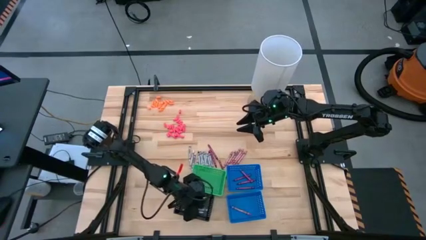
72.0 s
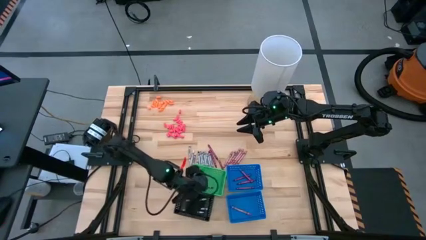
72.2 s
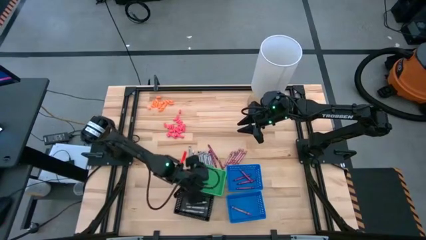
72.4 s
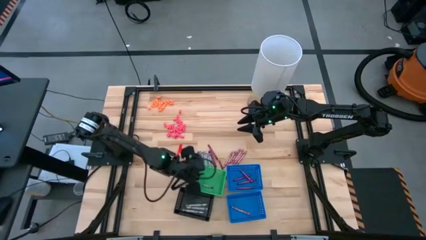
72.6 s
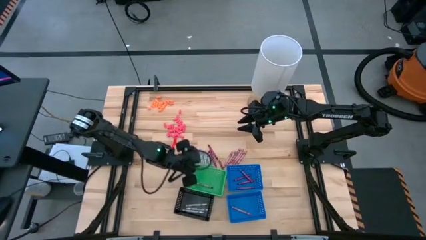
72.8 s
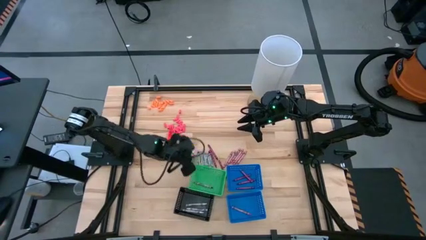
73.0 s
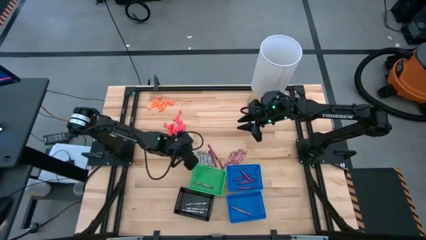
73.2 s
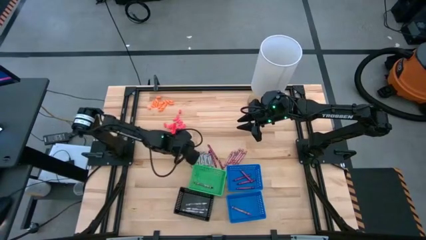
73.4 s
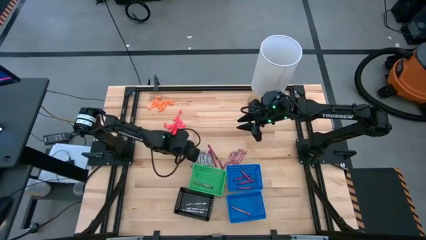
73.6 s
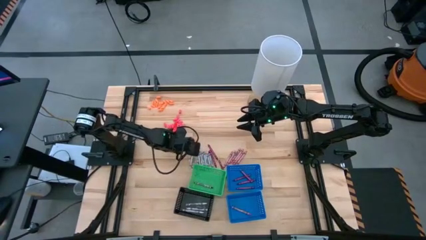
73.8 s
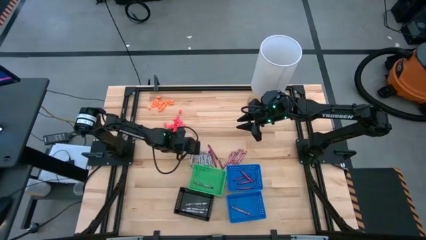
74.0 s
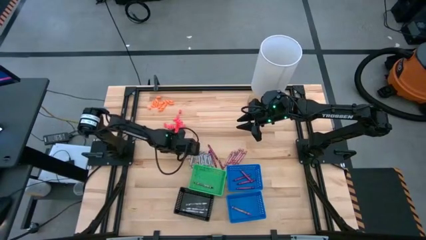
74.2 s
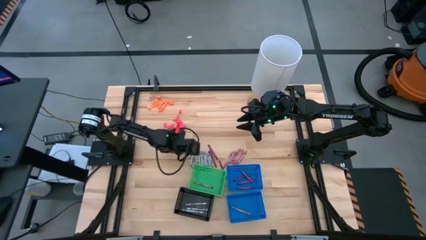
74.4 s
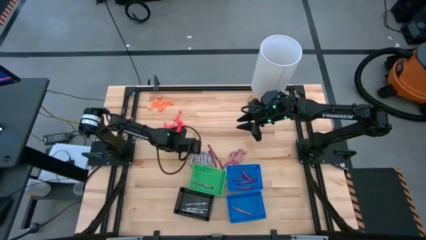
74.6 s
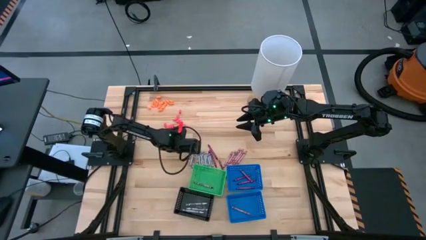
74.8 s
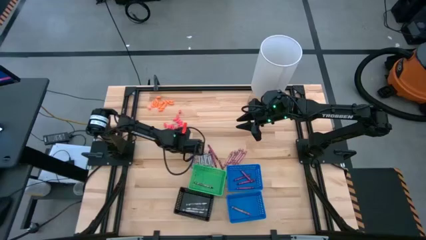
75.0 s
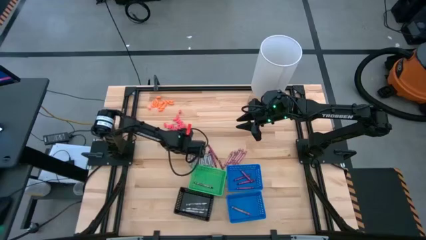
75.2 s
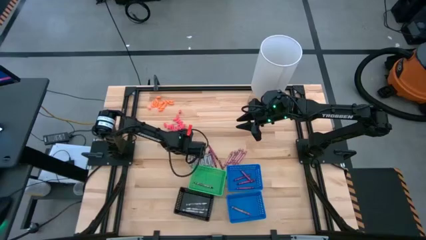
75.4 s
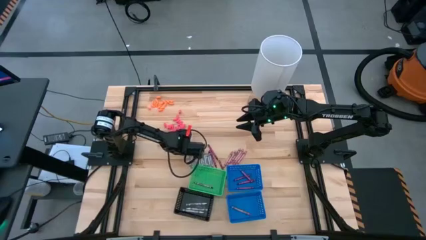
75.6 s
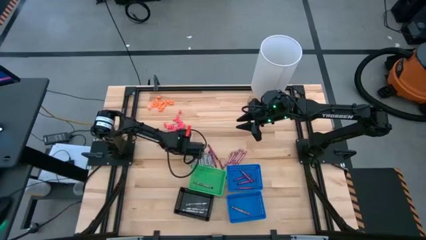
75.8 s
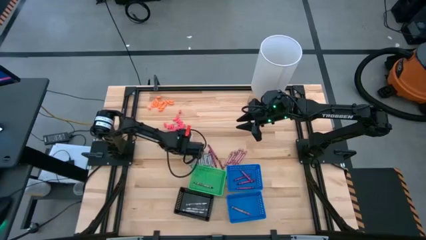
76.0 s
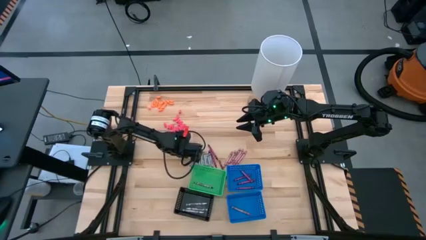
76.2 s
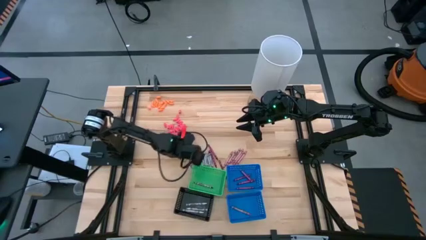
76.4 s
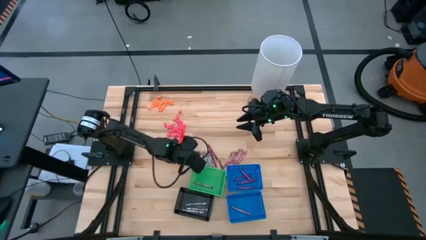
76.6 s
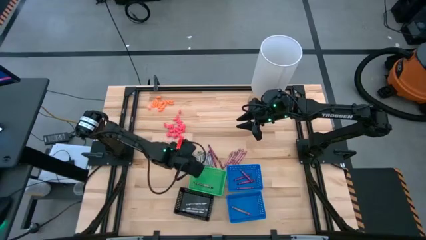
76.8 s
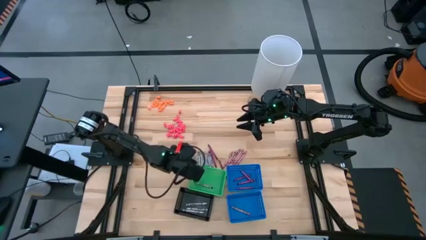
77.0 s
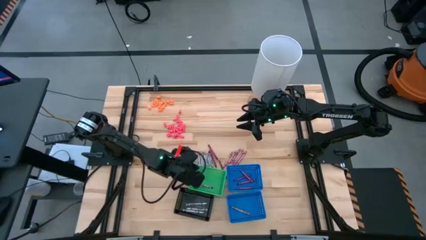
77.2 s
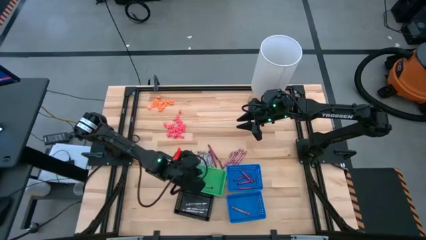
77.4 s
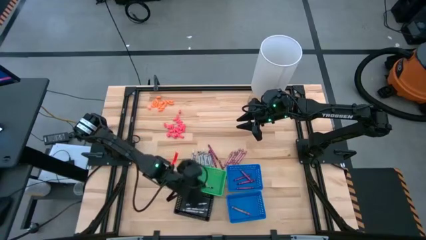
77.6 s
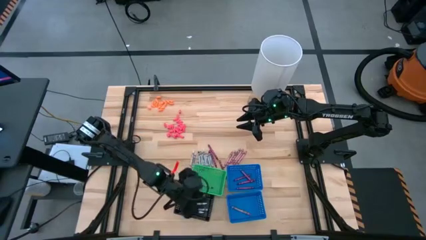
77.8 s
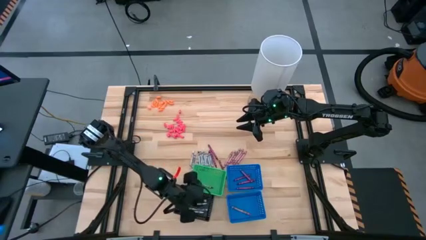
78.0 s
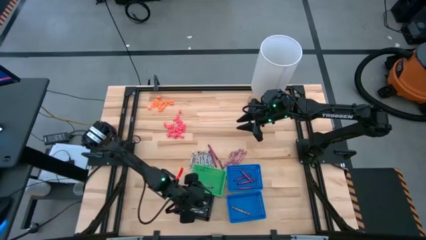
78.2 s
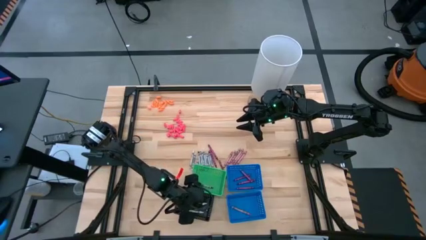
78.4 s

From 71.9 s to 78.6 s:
Task: Sort crayons
Put the white crayon into the black bin

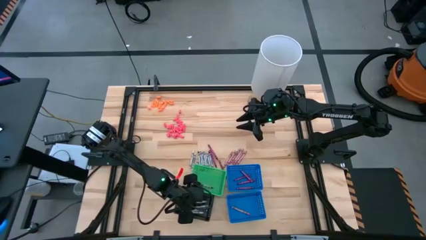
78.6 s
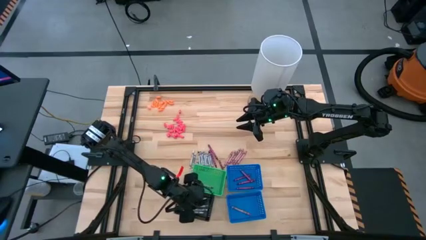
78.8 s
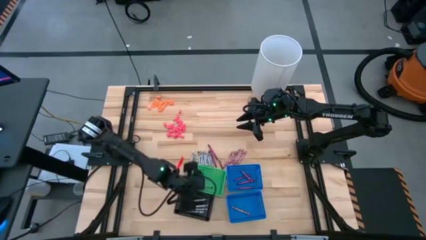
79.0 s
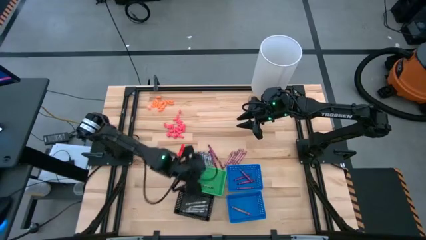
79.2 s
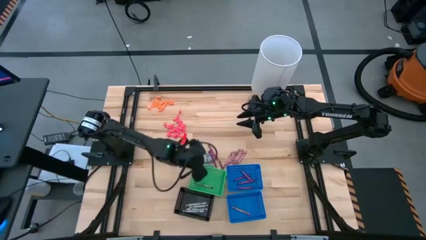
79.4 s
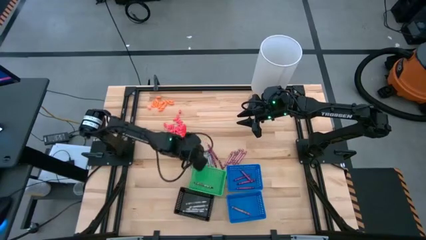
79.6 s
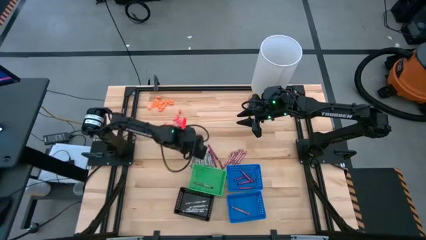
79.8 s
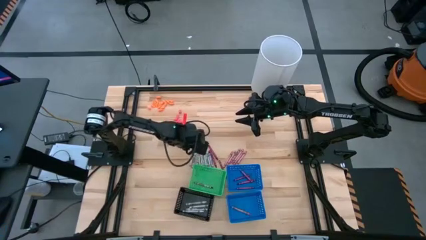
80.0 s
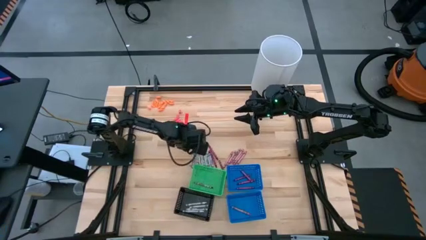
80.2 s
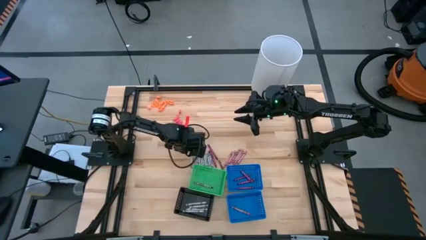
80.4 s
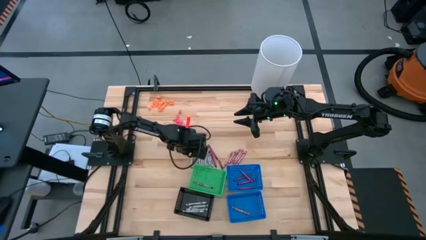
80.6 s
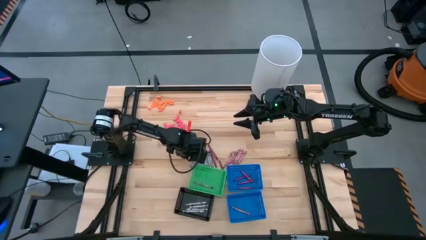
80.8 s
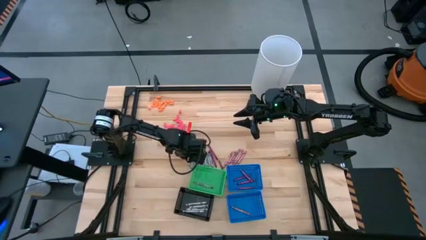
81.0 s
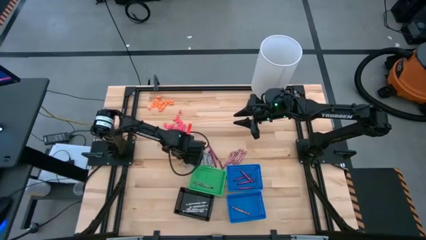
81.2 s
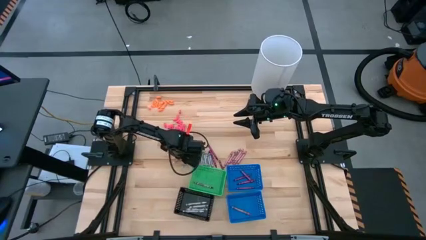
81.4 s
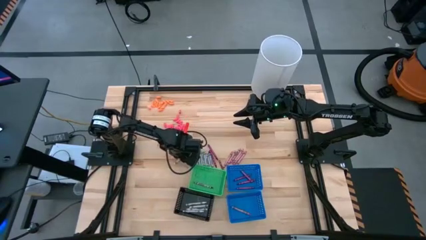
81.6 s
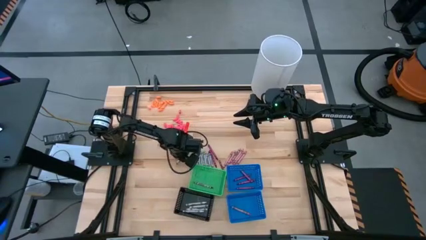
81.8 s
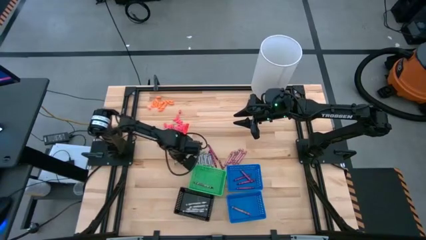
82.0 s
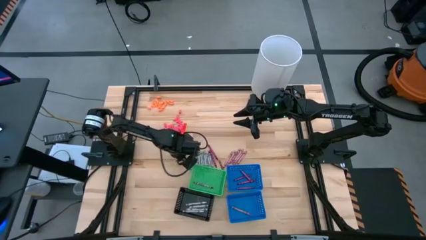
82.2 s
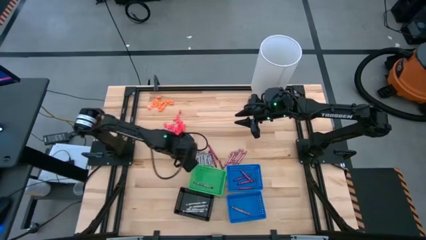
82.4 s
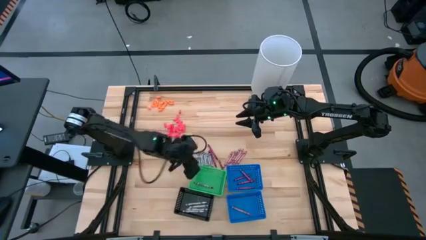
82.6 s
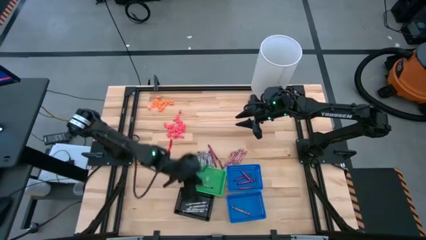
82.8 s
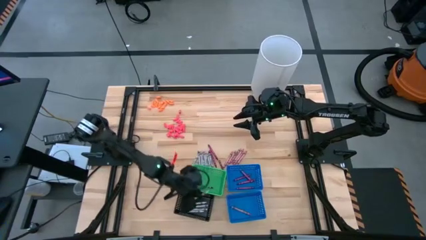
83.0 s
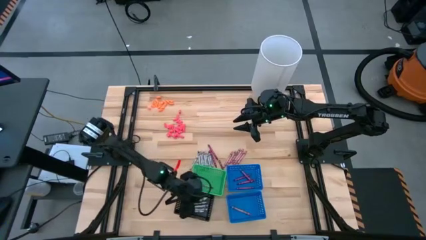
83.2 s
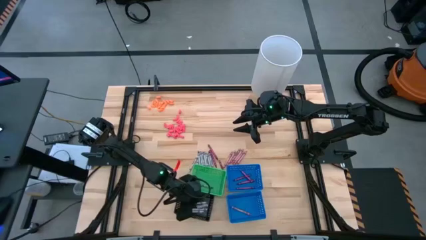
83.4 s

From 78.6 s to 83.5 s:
Put the white crayon into the black bin

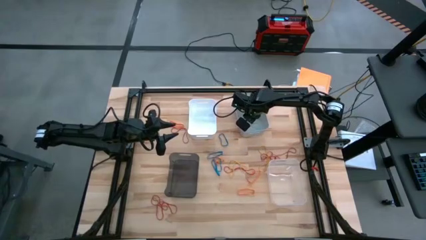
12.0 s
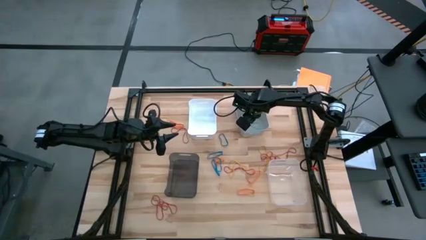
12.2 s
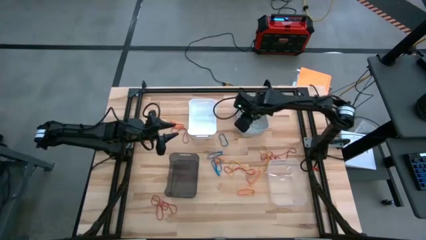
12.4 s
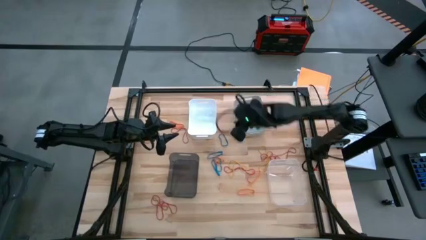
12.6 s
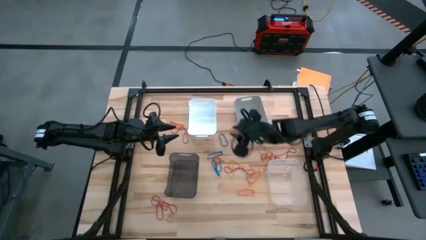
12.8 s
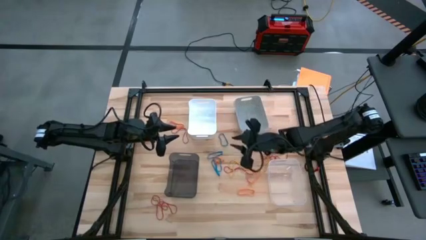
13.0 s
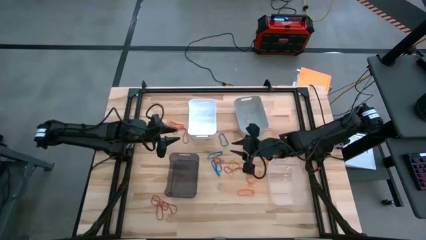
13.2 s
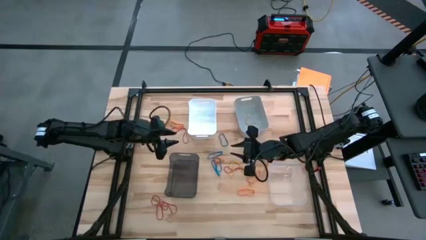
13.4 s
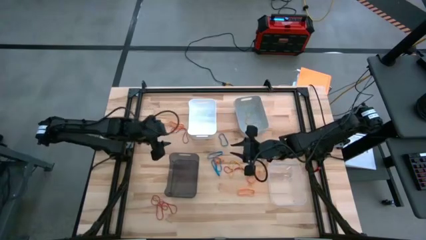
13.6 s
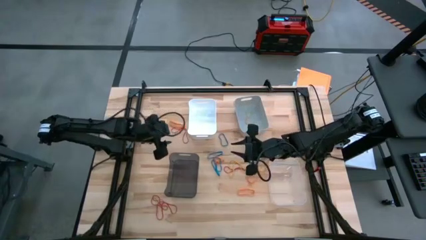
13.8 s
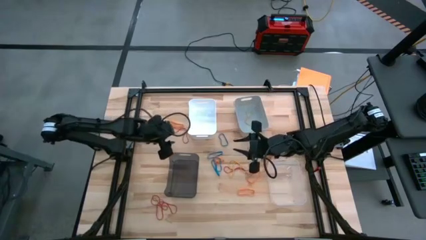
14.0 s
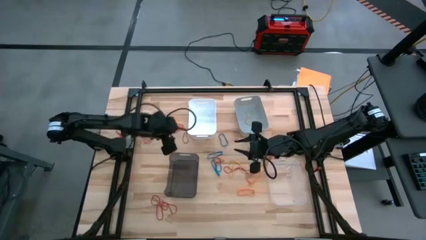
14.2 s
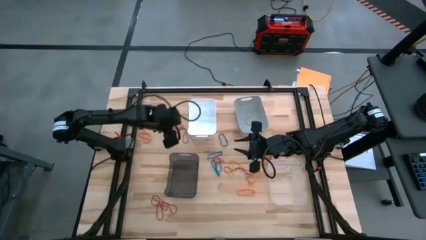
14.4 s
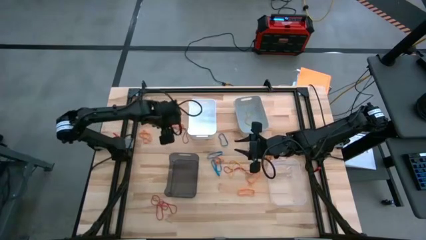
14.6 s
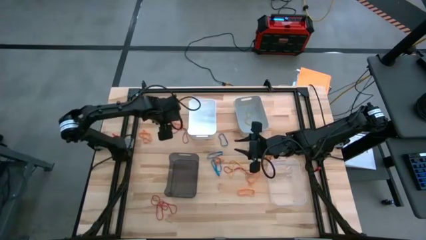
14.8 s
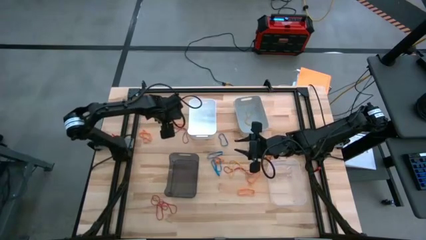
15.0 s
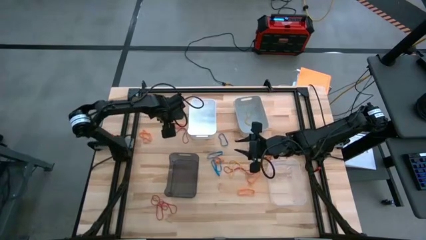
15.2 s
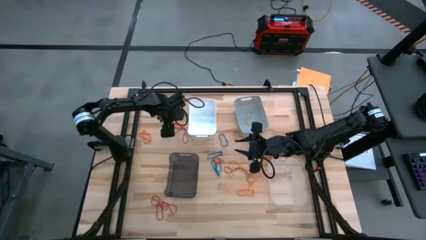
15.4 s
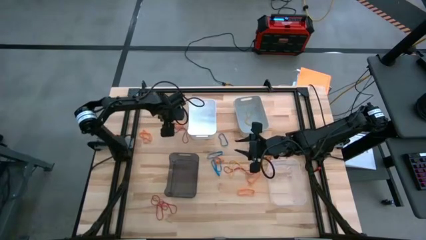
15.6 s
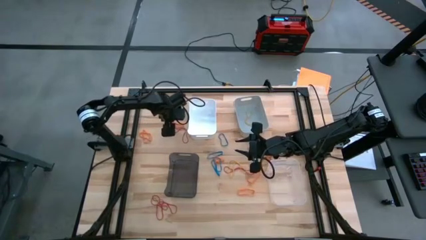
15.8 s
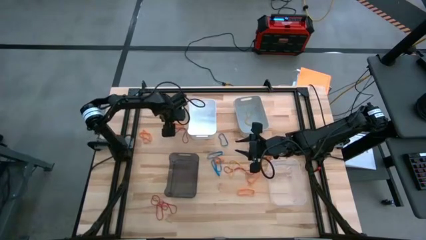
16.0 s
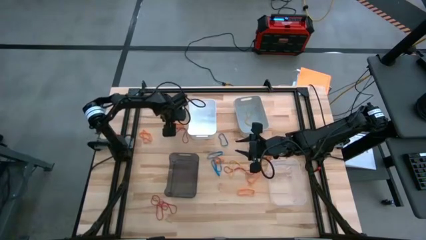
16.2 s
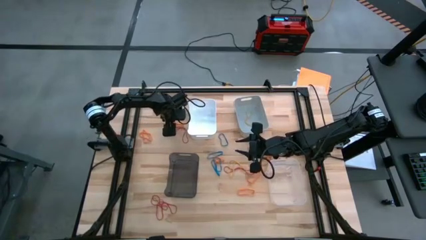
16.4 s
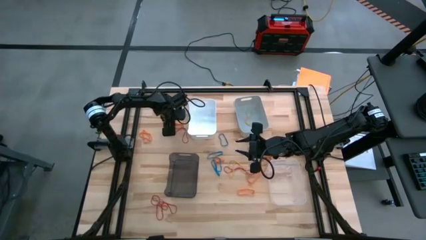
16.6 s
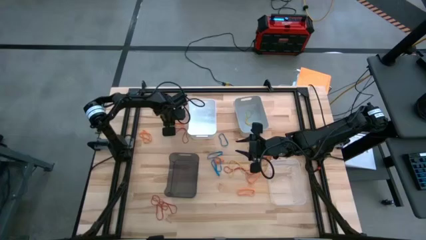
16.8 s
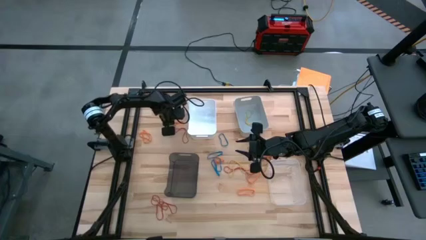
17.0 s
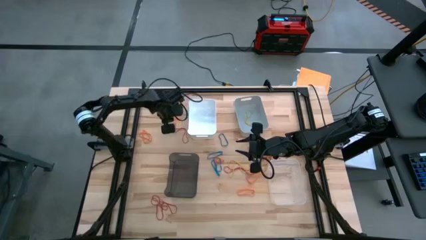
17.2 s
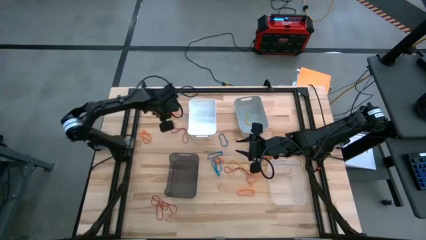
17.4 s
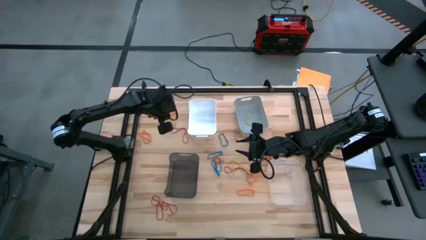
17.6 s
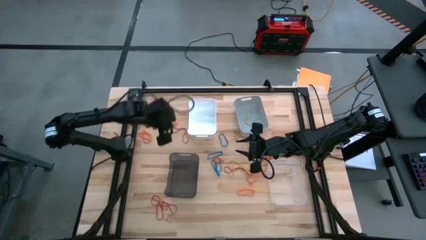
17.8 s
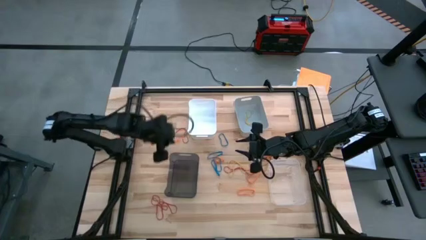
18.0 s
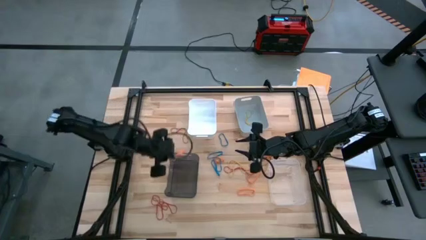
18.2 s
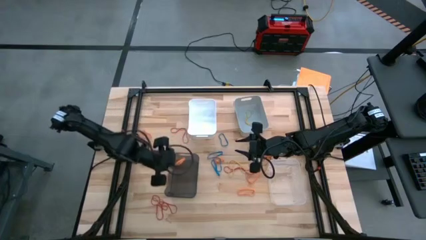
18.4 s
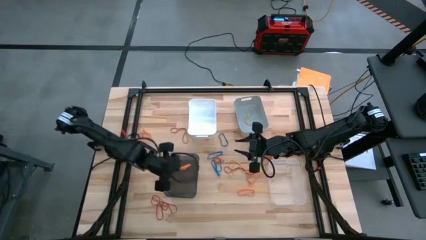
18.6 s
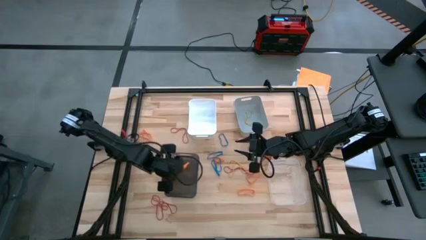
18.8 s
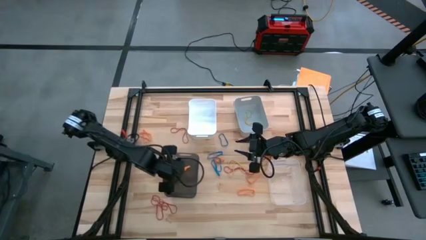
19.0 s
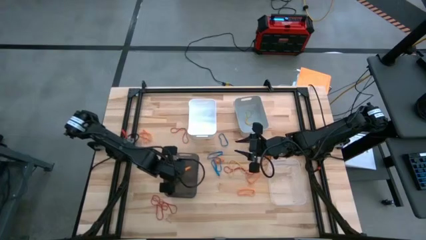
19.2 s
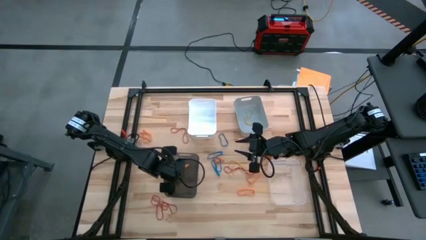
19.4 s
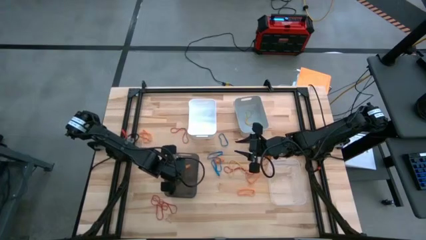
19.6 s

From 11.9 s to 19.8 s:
Task: Sort rubber bands into baskets
Put the orange rubber band into the black bin
